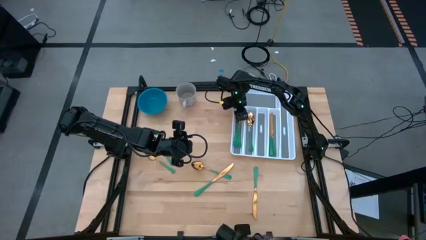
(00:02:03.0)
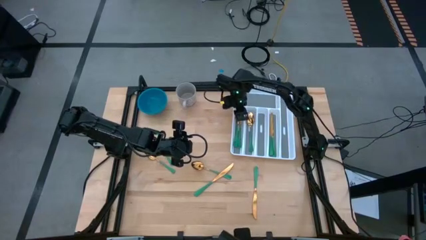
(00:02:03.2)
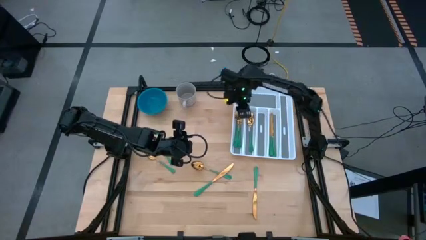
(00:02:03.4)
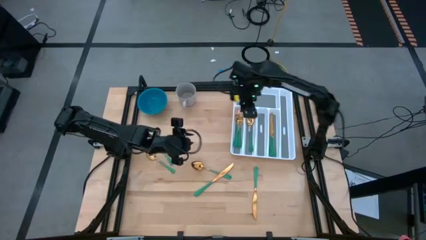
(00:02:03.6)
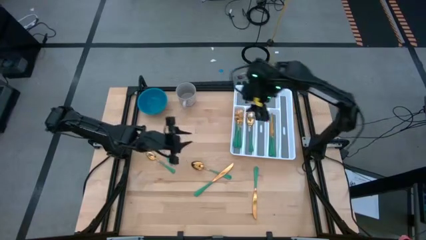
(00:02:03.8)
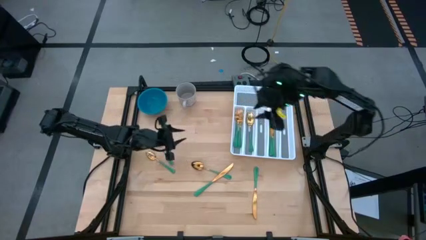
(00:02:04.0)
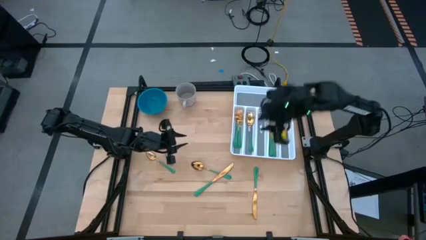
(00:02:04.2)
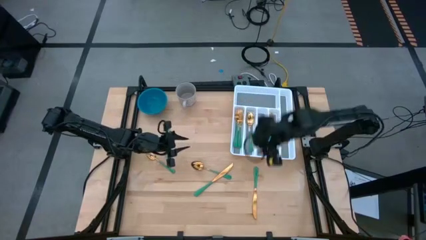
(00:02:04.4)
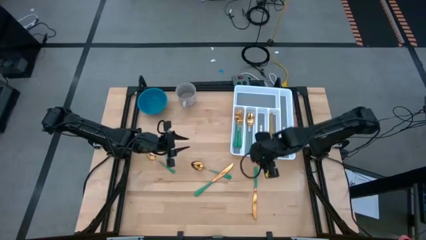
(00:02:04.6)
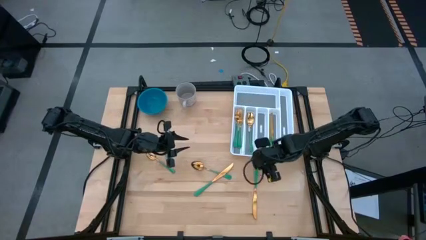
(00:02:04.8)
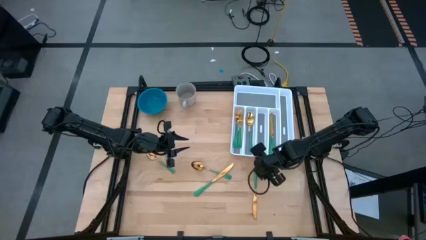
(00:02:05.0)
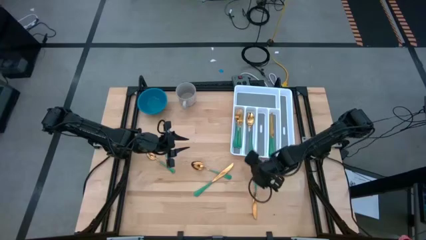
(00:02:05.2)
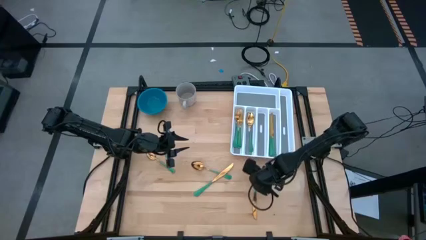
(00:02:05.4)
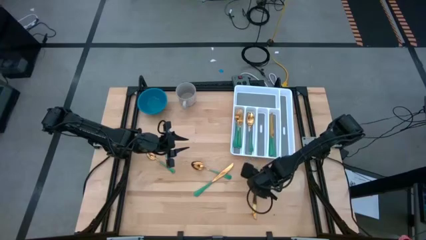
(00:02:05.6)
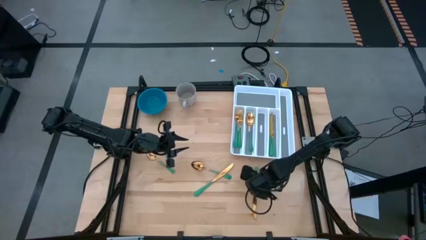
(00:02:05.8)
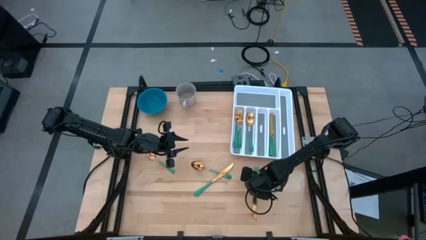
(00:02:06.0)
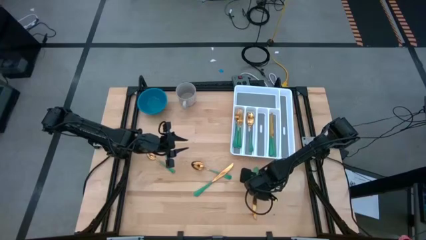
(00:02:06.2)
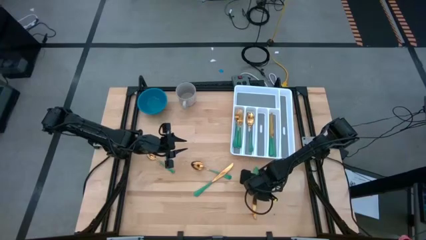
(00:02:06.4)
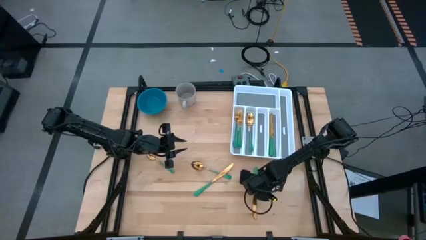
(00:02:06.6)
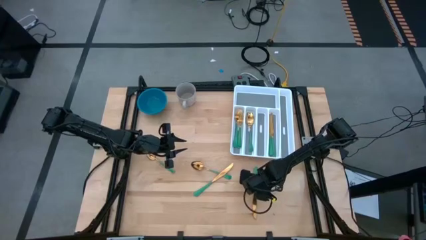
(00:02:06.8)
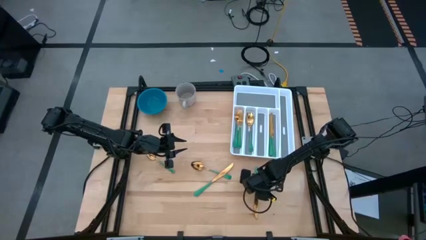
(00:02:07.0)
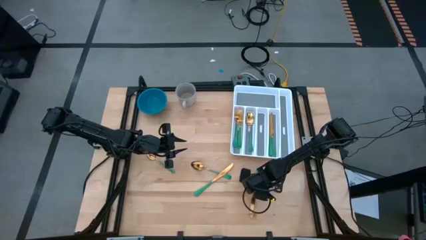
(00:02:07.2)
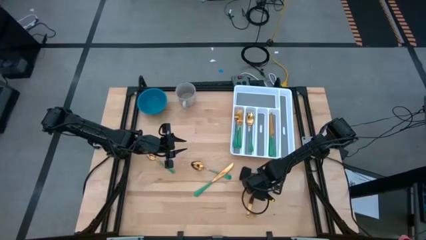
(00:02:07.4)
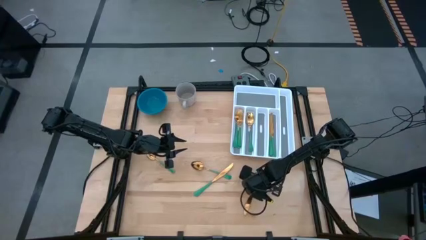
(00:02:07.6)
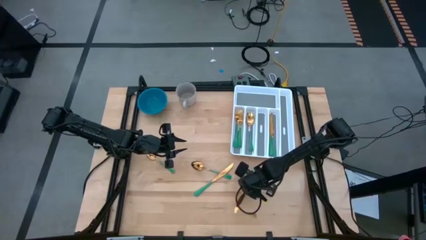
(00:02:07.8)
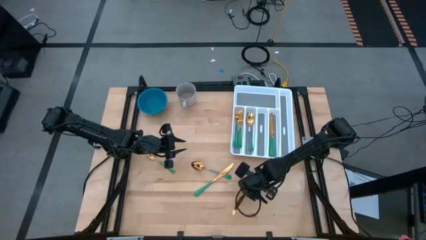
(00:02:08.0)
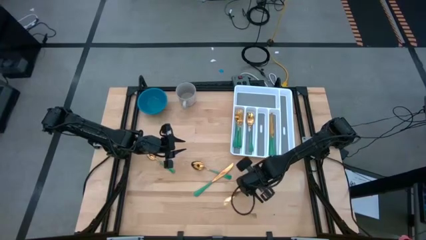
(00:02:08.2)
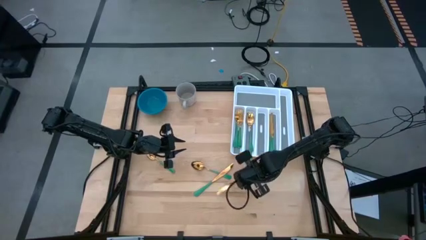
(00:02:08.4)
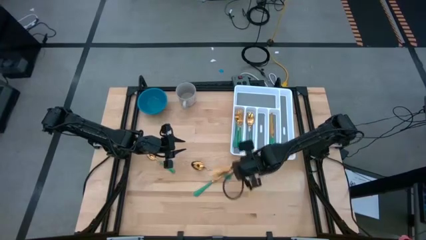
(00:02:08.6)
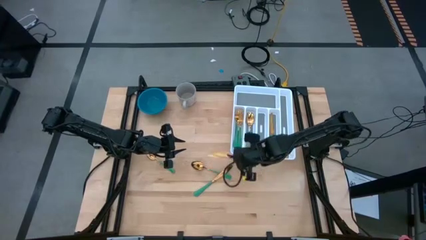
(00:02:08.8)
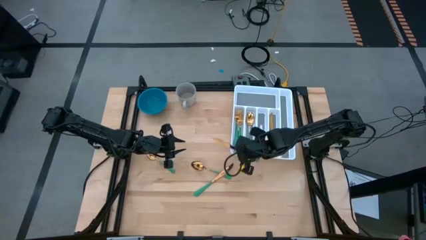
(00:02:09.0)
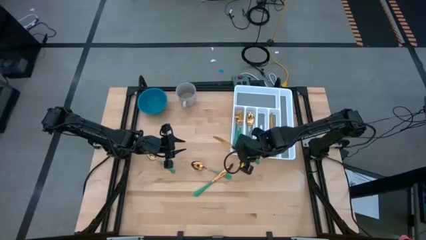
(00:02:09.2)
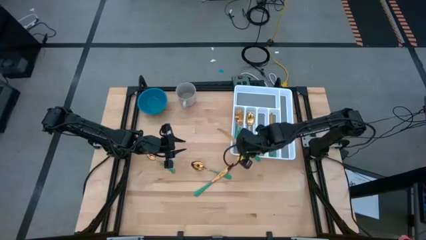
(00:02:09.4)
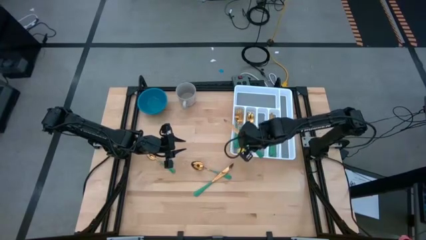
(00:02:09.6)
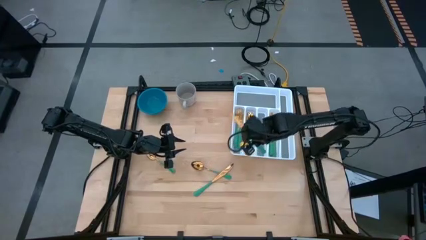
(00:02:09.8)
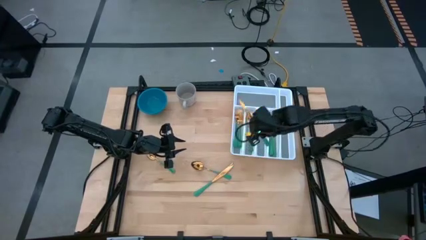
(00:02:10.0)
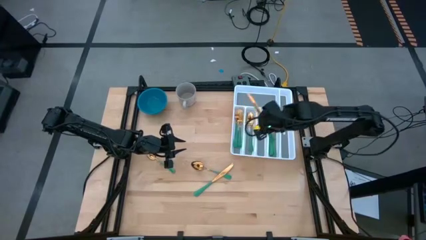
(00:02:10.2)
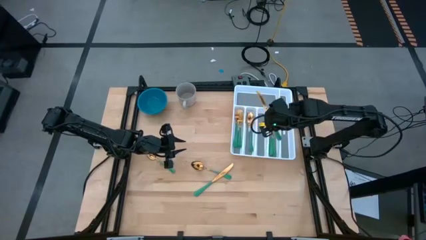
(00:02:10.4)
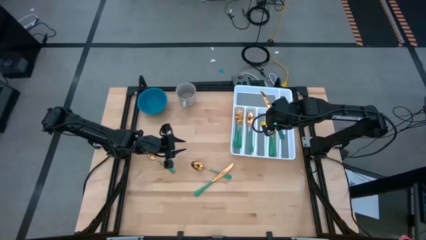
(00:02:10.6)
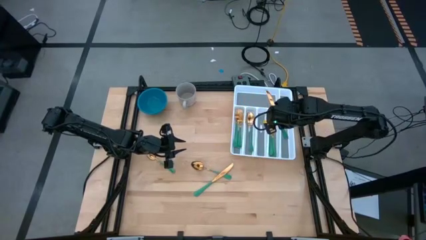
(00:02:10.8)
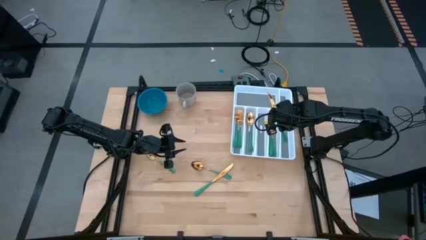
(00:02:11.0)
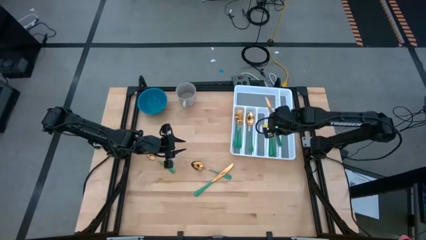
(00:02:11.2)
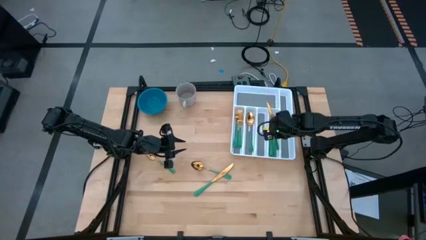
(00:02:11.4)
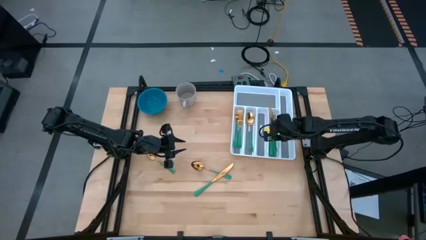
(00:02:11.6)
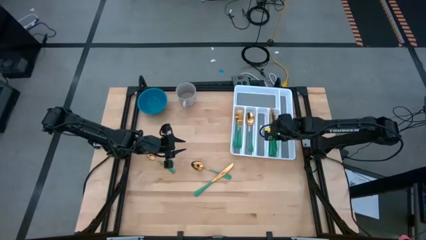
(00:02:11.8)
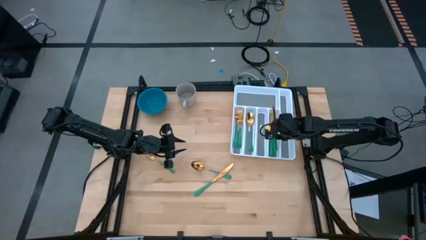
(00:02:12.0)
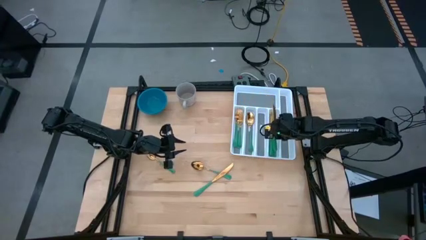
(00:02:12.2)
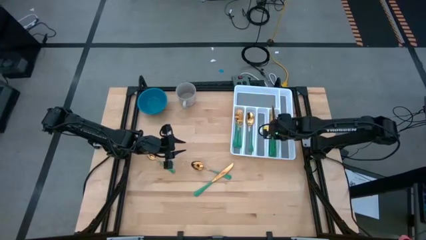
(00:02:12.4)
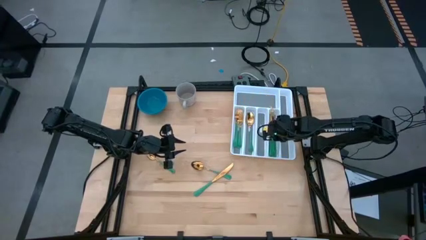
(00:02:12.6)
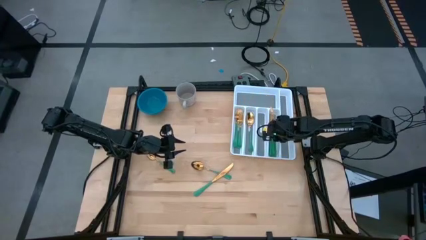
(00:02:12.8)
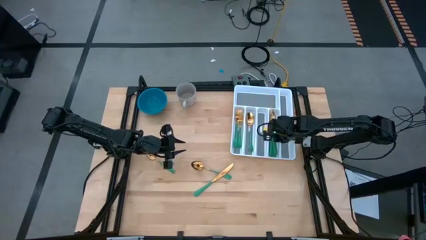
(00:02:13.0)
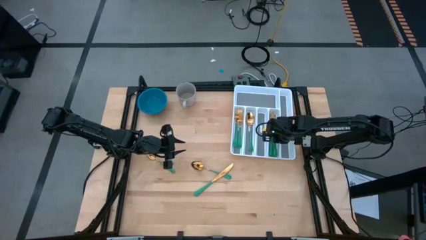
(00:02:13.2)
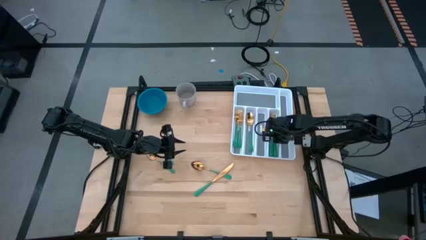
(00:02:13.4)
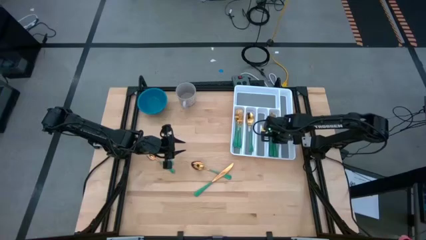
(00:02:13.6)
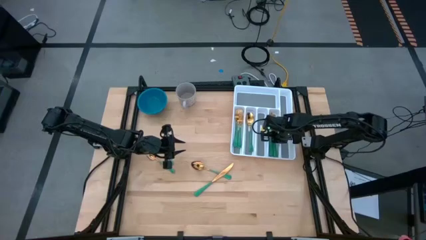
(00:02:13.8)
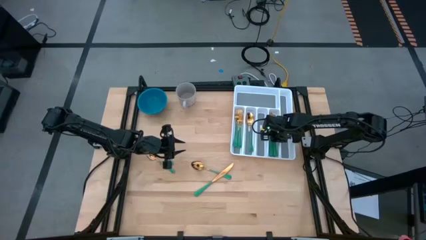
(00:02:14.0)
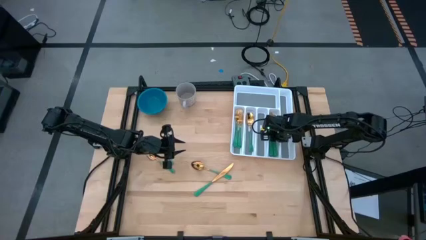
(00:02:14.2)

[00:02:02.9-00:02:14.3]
Task: Sort silverware
Put the green knife into the white silverware organizer

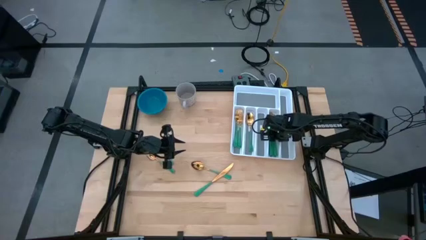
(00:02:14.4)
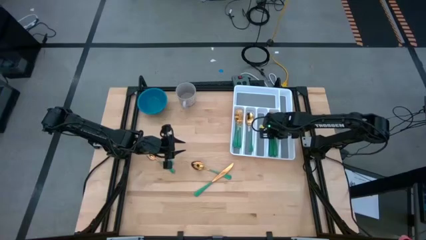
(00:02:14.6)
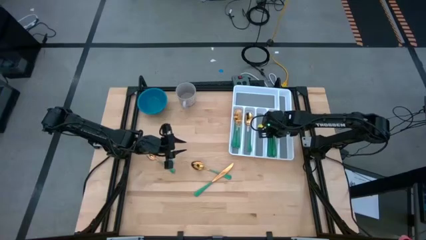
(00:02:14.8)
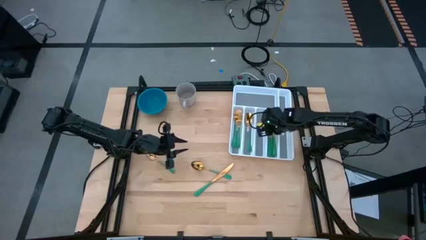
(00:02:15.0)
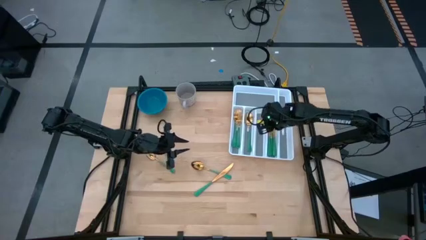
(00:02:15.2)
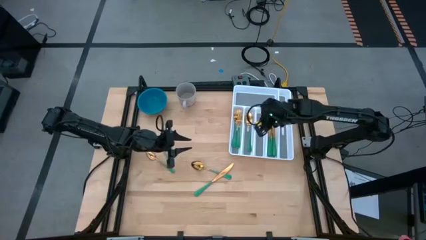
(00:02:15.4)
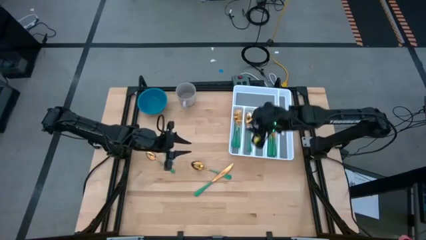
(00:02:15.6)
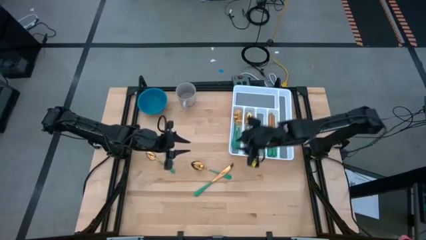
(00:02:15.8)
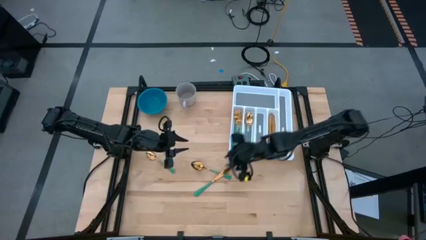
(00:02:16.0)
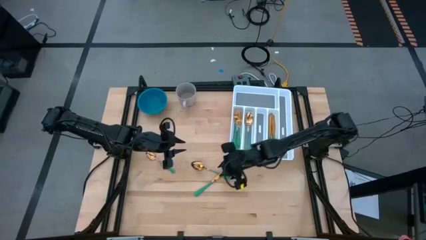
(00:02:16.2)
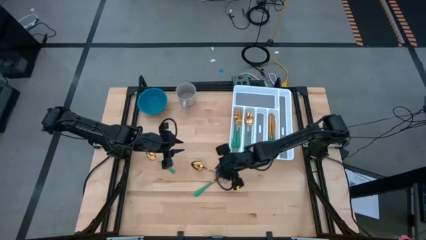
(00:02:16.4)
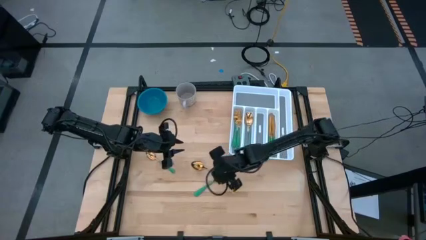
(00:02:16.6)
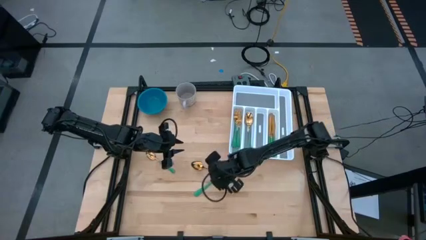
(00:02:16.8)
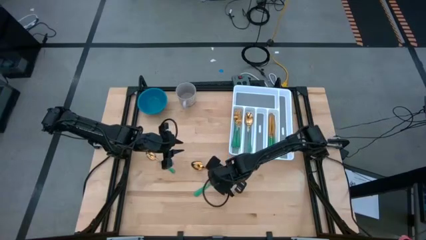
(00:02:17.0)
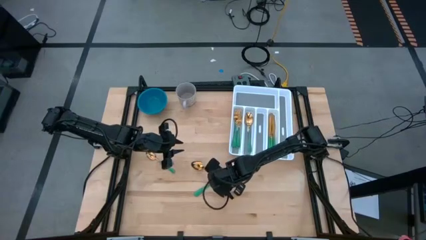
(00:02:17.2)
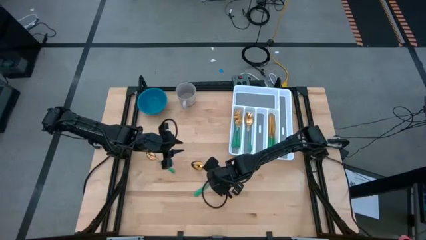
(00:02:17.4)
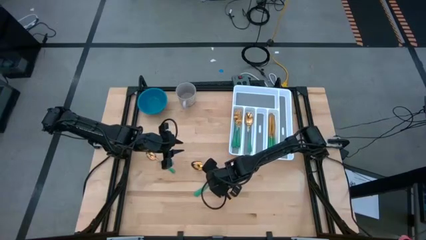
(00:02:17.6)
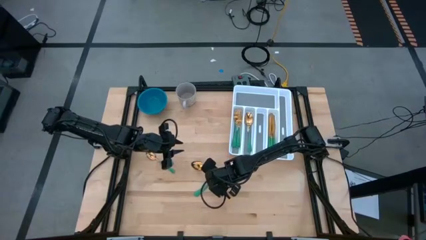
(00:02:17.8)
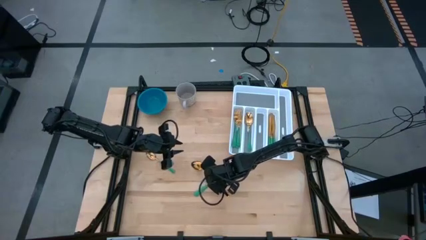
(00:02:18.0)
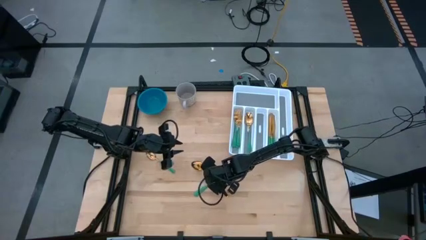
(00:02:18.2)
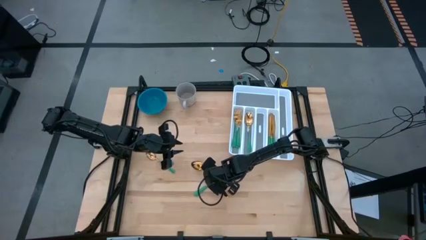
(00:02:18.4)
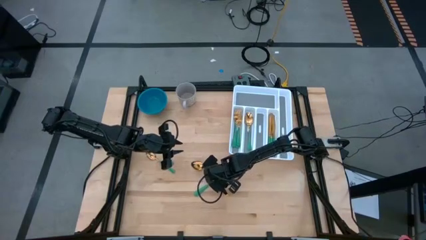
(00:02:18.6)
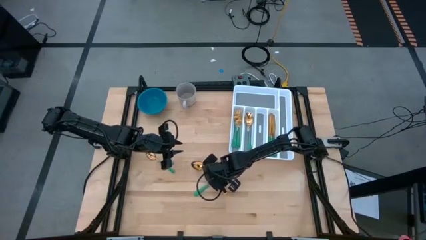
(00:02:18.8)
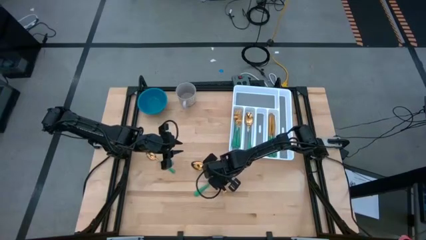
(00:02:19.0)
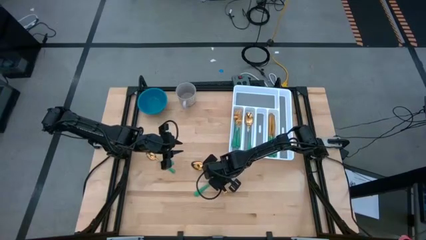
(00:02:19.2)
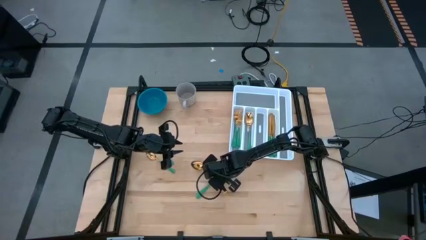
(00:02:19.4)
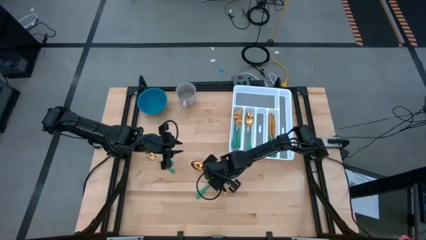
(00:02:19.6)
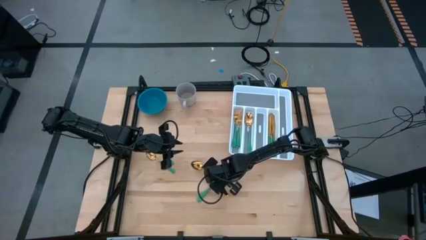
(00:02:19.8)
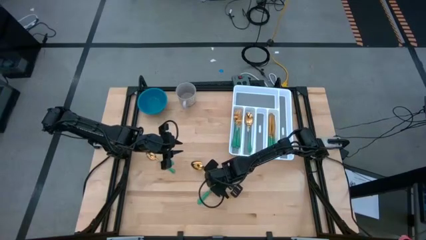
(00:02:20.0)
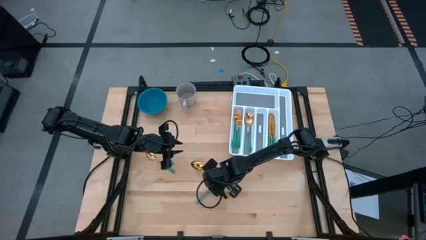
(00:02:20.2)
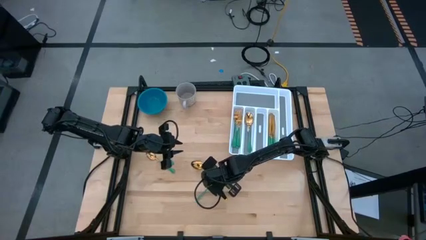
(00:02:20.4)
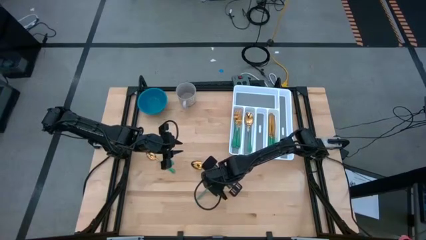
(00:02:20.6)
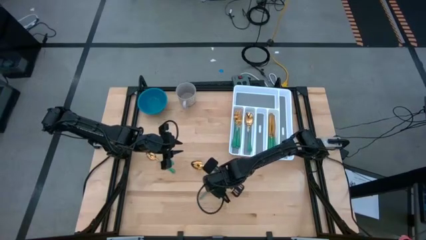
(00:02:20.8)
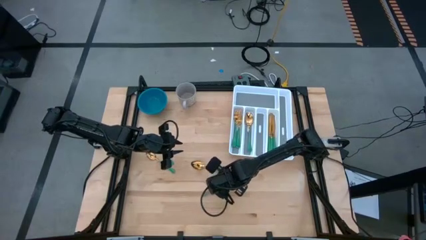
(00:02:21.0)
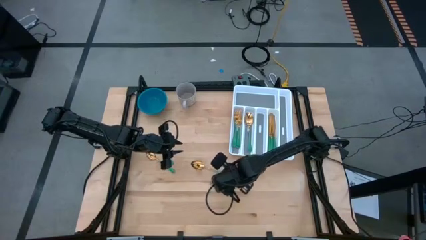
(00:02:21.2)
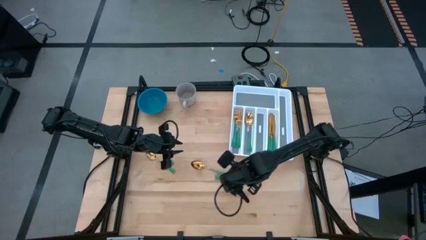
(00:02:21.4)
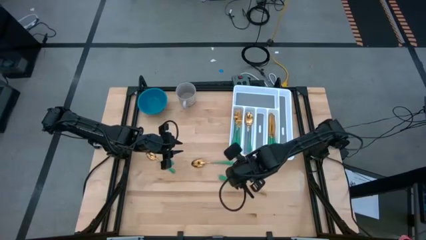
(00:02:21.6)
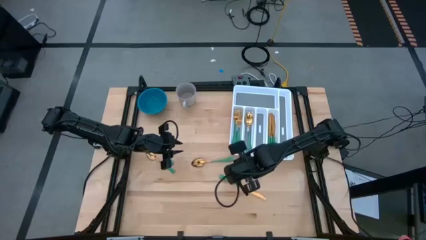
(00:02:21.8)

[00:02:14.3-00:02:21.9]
Put the green knife into the white silverware organizer
